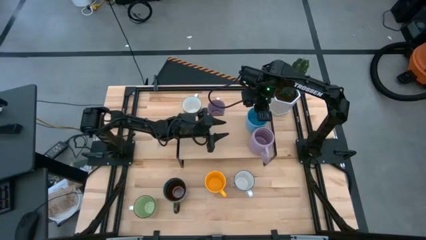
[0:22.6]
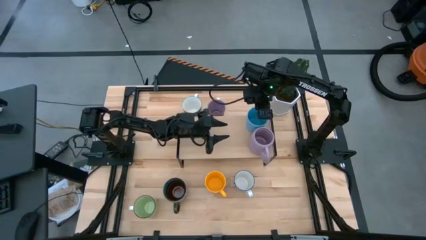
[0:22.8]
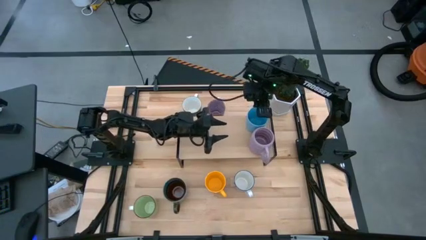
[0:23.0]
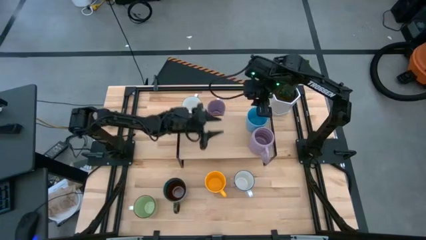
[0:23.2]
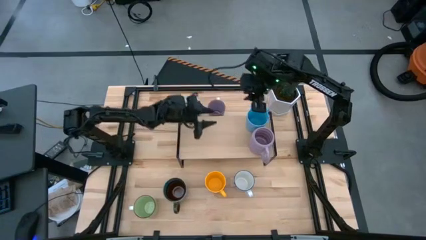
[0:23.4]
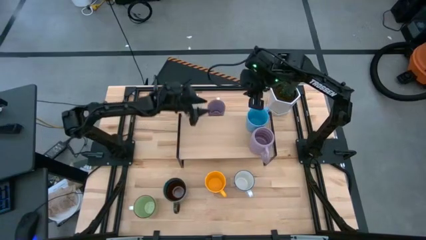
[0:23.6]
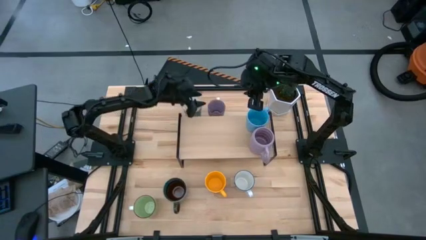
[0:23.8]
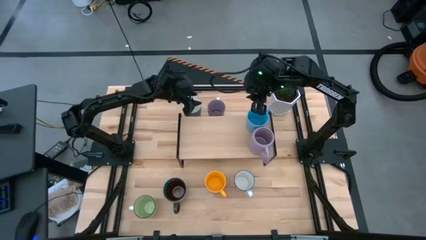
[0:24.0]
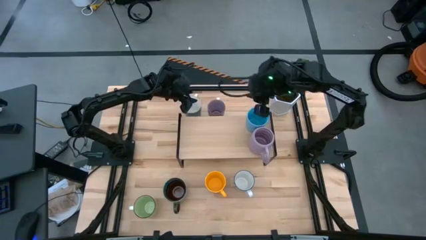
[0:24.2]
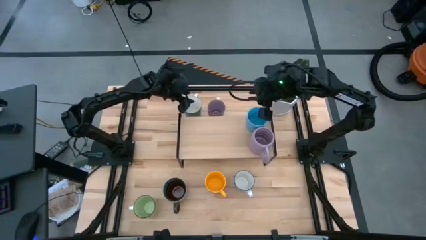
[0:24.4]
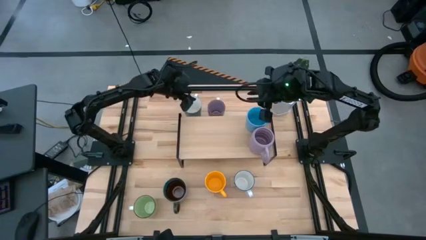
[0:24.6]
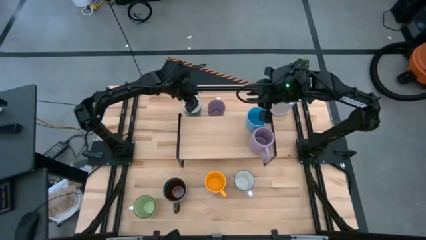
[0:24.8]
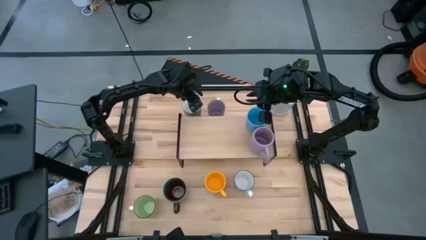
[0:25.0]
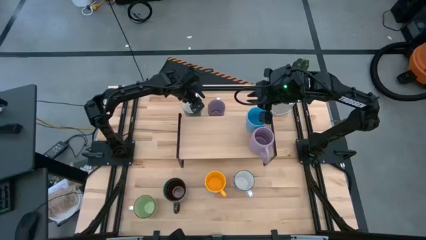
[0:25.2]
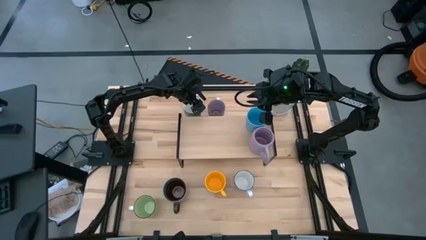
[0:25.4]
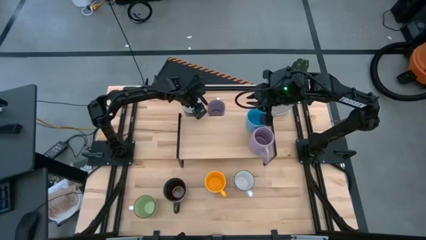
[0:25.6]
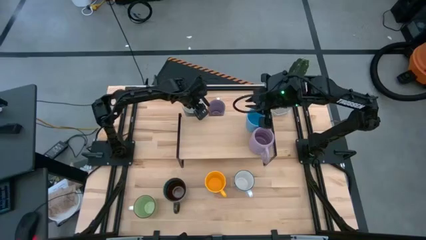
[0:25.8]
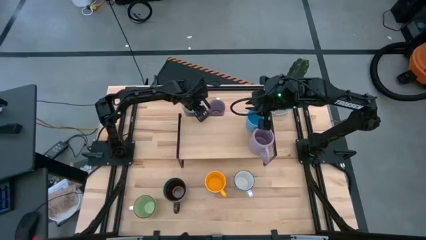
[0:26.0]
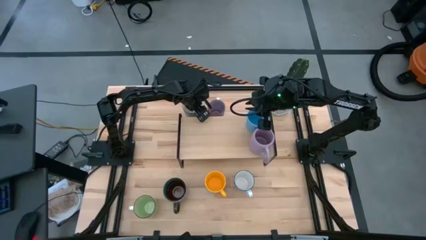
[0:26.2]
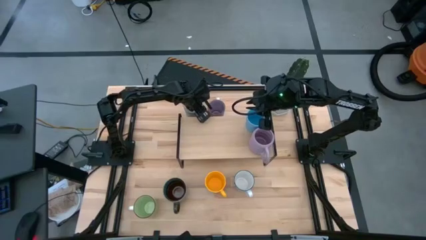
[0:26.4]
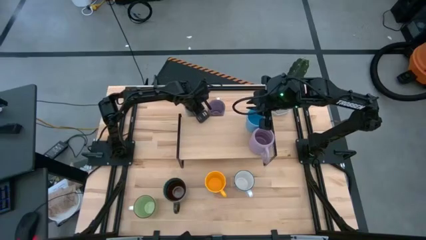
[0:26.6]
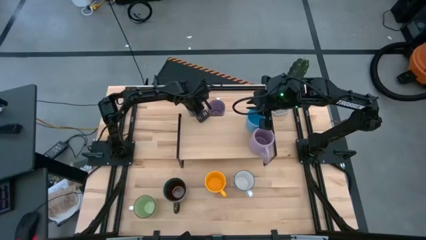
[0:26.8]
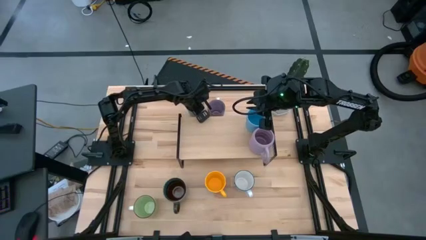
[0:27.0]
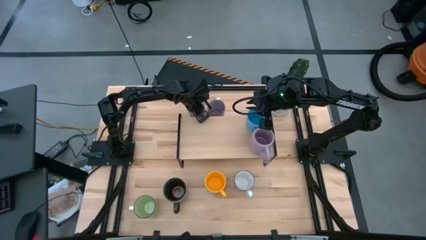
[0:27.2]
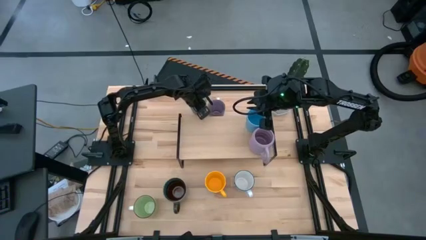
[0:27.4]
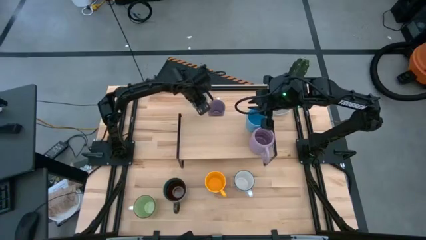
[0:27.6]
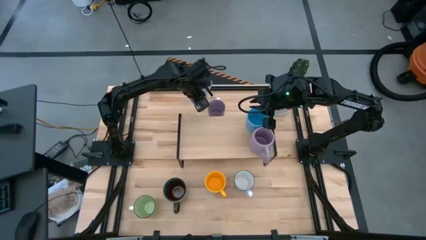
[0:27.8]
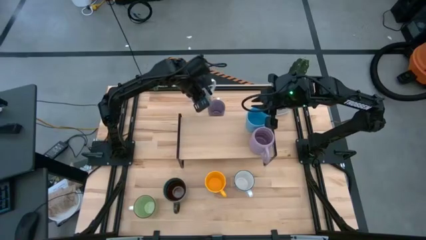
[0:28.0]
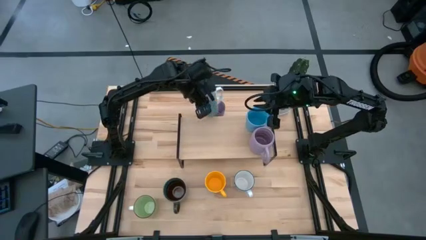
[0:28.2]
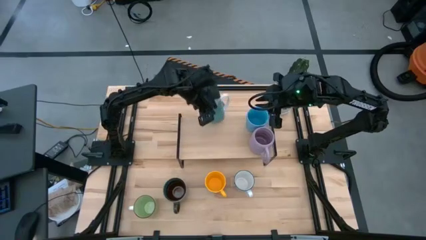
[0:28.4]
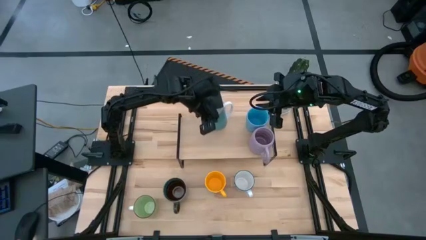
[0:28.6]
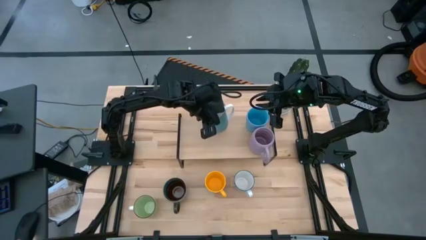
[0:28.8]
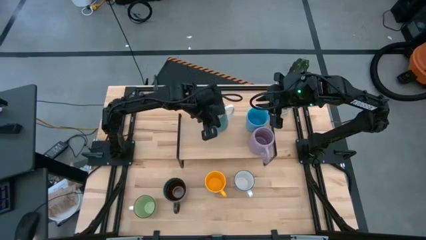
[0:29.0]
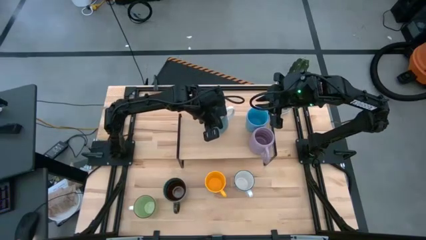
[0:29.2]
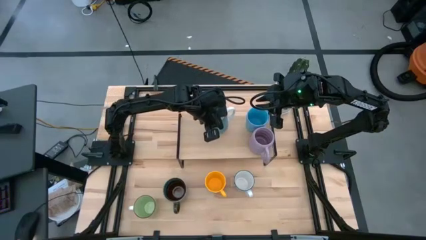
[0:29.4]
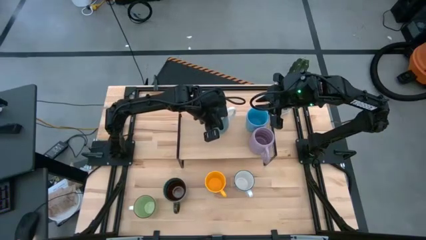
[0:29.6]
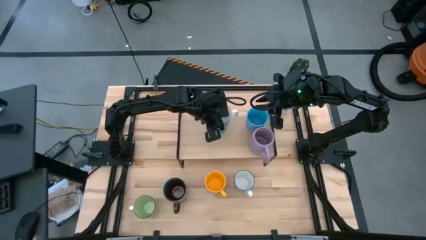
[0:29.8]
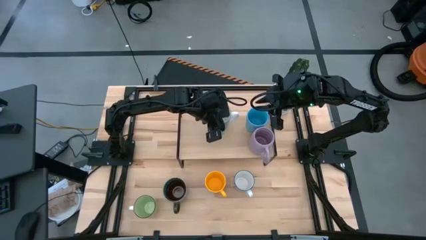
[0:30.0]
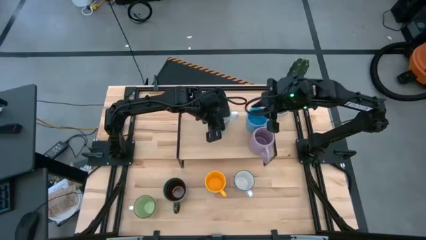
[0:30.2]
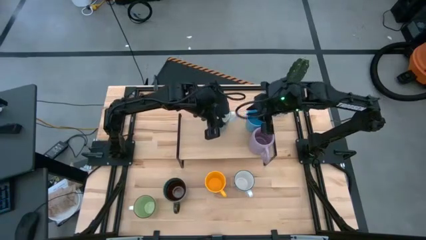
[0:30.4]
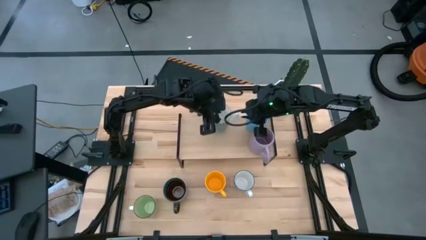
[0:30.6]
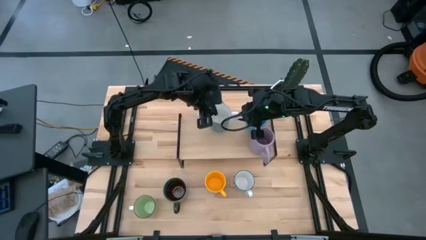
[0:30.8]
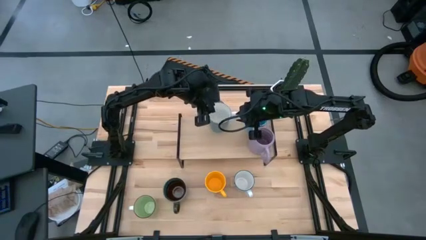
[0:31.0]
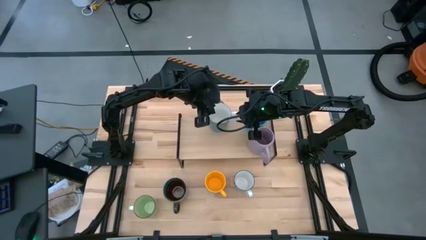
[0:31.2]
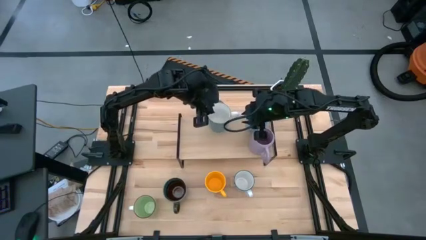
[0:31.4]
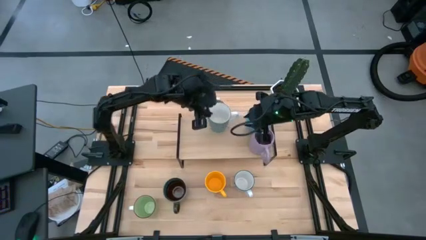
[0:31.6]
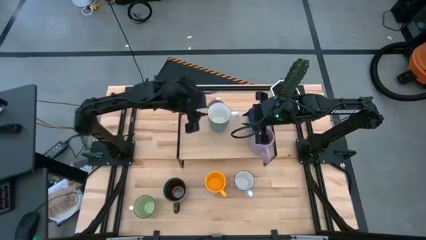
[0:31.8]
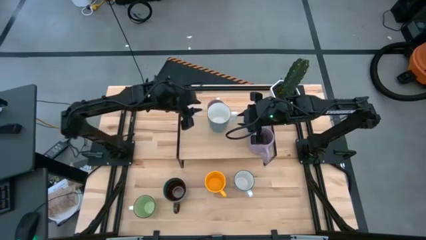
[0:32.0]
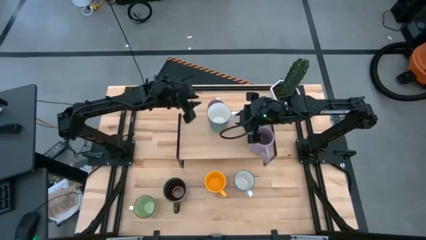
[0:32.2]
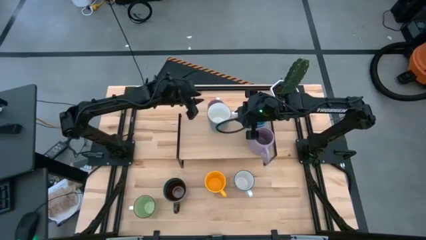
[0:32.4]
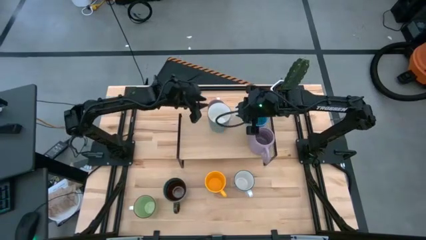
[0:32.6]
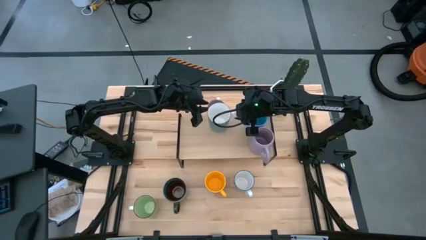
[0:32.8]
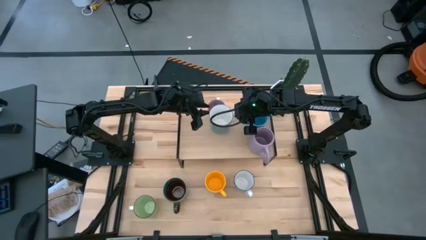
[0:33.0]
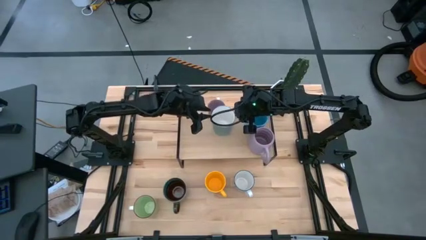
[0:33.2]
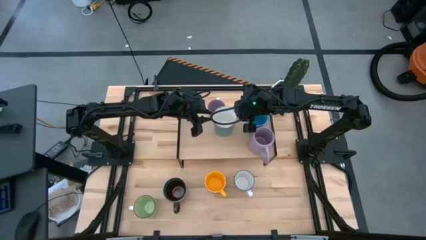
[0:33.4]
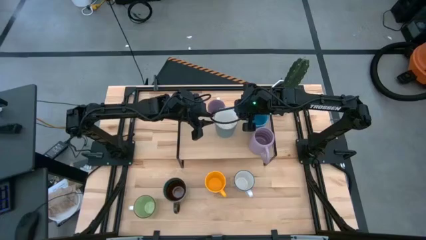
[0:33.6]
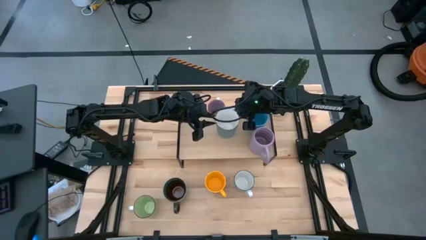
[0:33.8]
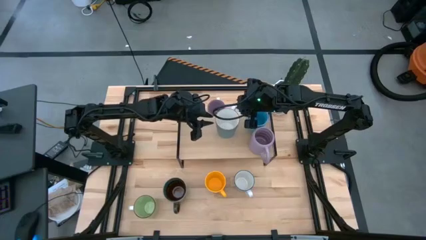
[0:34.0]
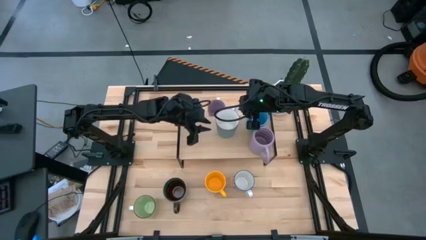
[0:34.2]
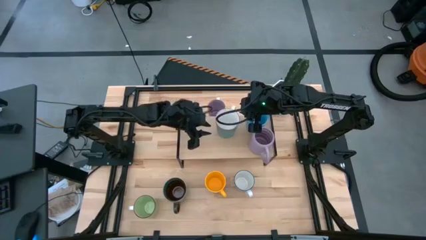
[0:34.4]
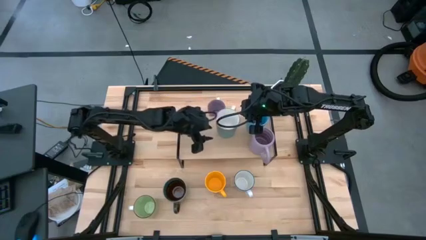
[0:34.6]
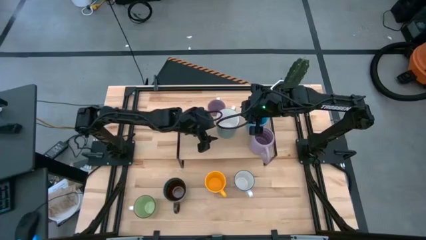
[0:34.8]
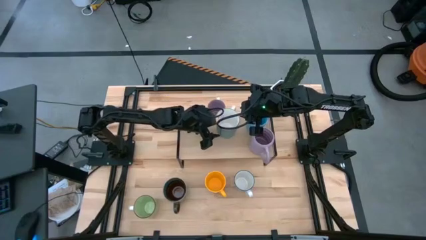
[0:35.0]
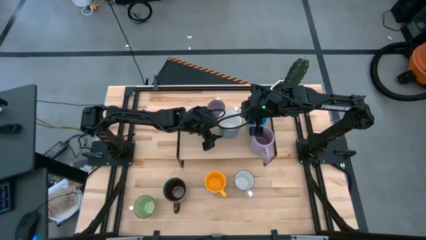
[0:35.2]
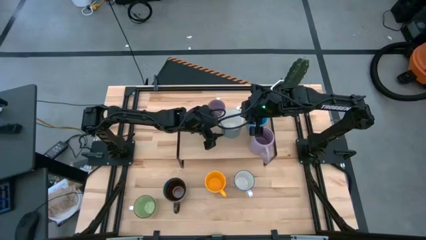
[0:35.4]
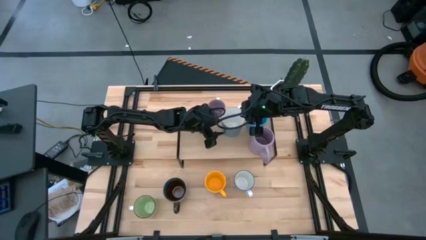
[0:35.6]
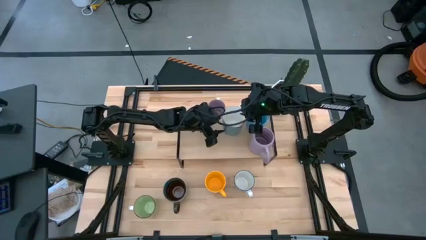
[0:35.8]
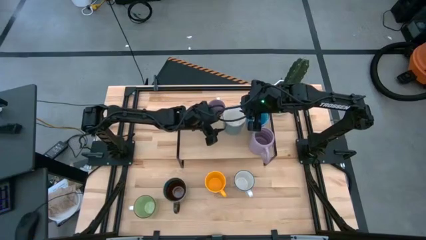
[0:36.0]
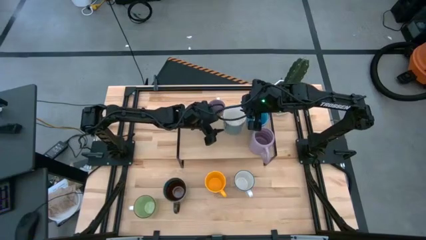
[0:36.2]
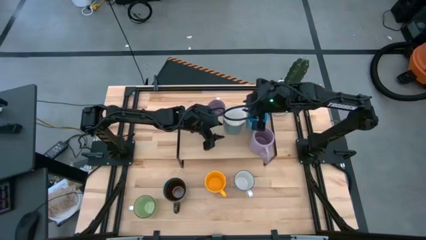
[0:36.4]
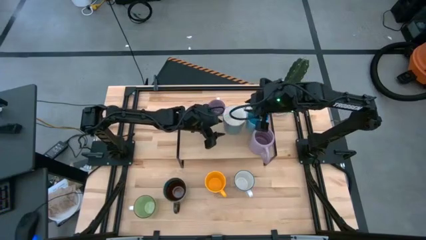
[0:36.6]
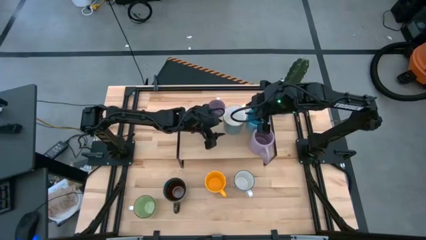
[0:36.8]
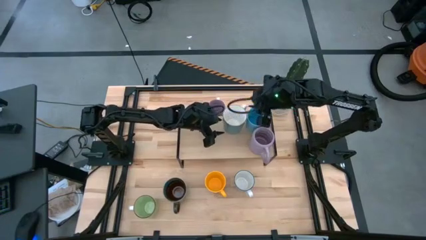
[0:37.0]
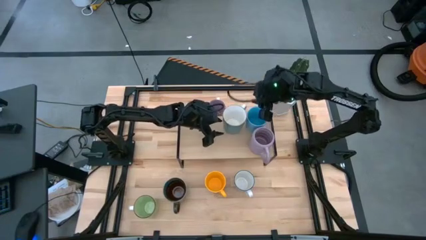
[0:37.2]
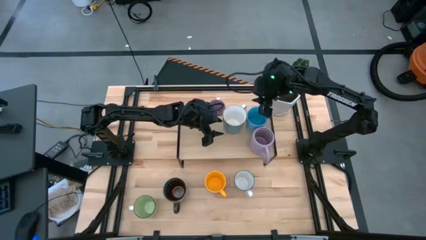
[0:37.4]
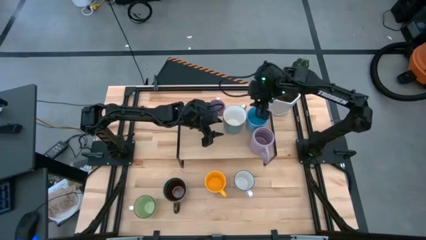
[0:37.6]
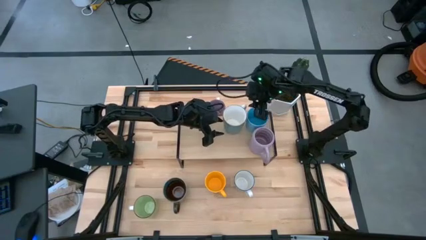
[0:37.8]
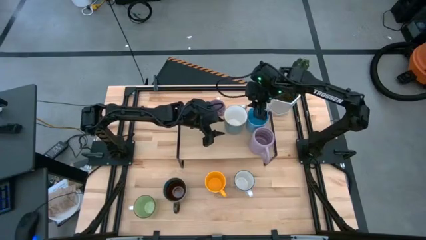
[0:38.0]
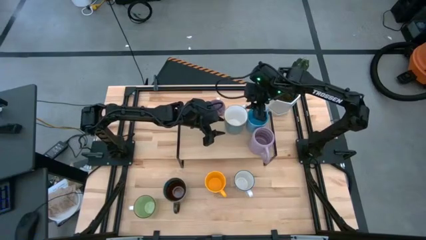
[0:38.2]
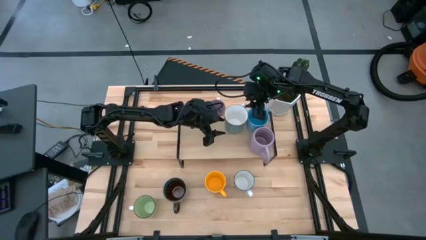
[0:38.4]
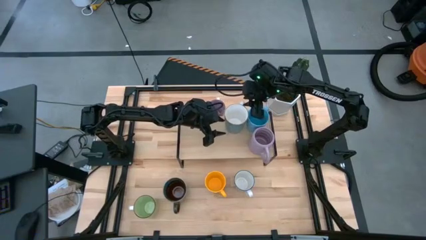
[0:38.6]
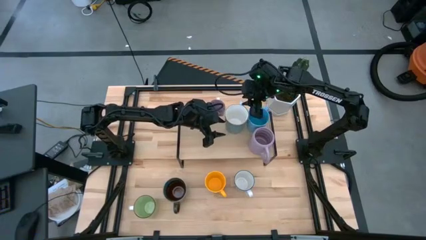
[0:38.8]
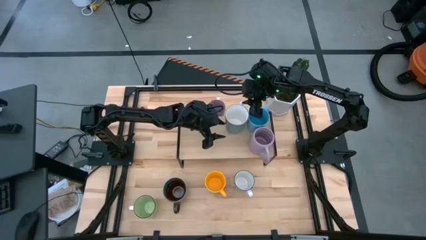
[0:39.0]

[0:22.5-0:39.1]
Task: Place coffee mugs
Put the dark green cup on the shelf
